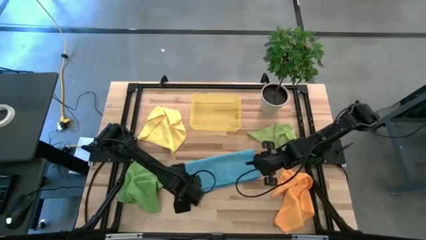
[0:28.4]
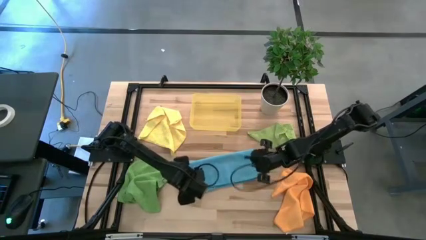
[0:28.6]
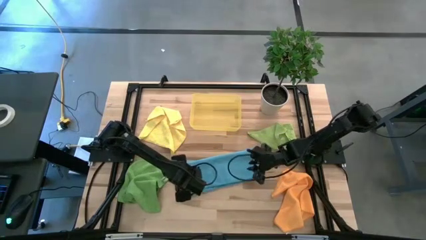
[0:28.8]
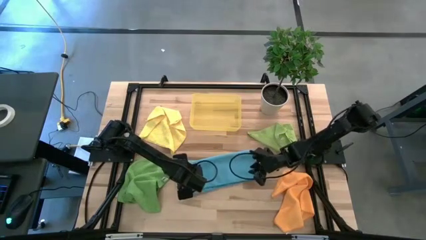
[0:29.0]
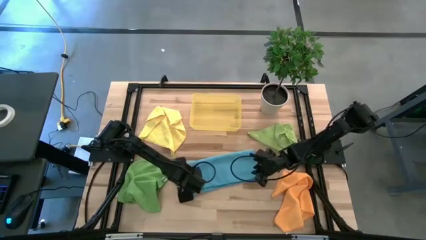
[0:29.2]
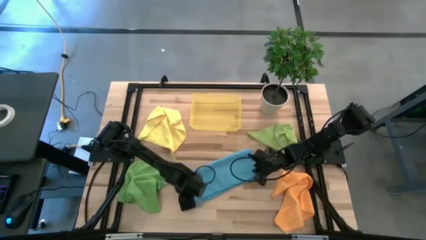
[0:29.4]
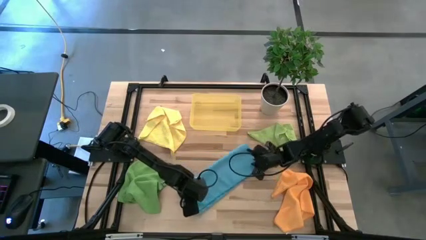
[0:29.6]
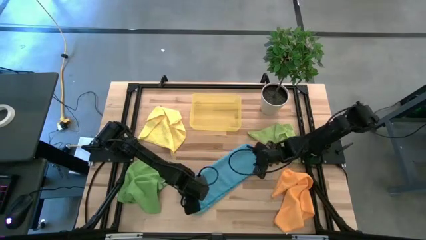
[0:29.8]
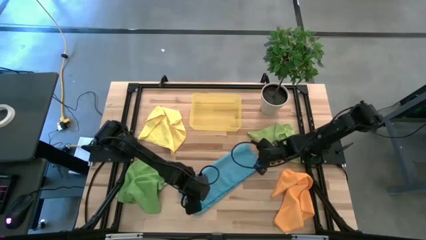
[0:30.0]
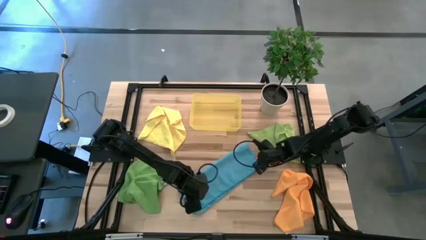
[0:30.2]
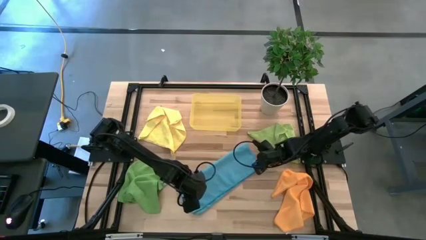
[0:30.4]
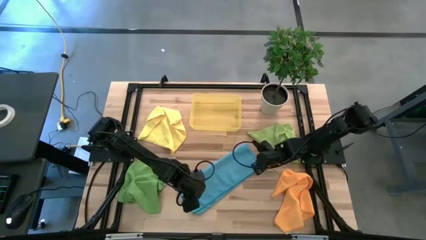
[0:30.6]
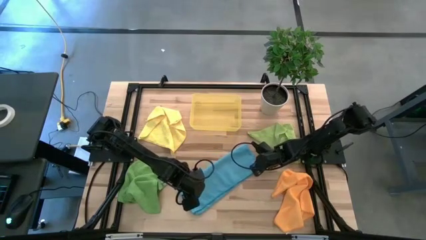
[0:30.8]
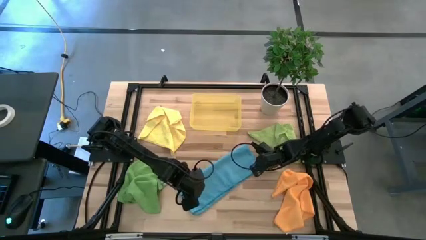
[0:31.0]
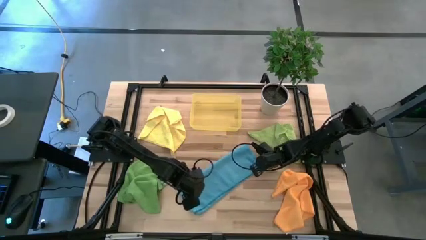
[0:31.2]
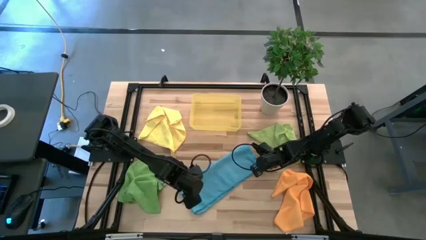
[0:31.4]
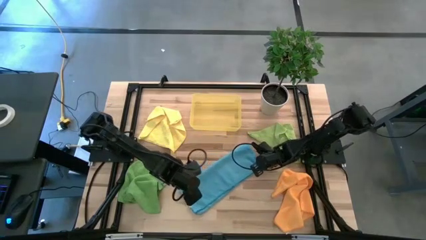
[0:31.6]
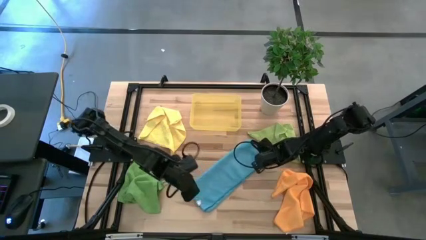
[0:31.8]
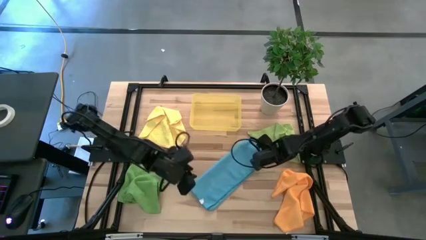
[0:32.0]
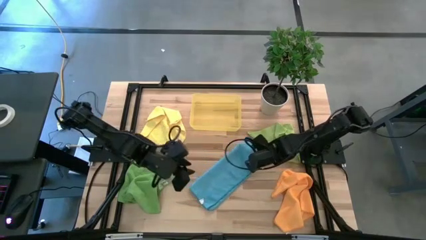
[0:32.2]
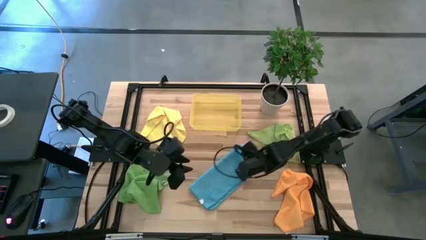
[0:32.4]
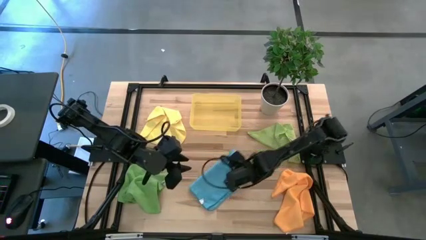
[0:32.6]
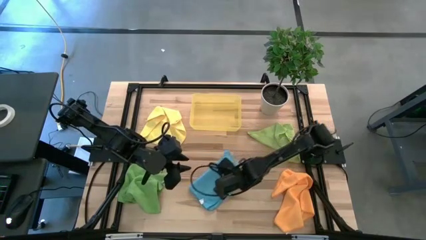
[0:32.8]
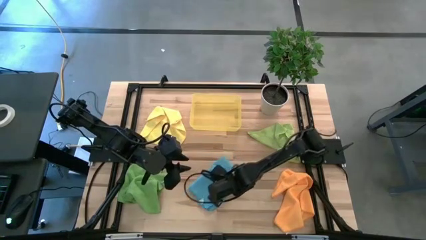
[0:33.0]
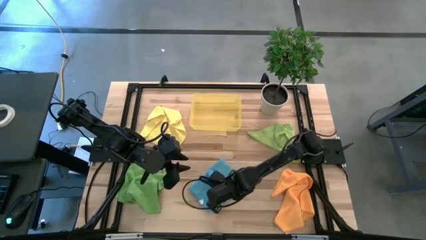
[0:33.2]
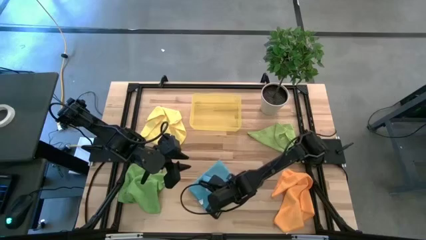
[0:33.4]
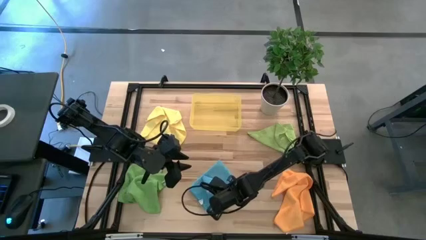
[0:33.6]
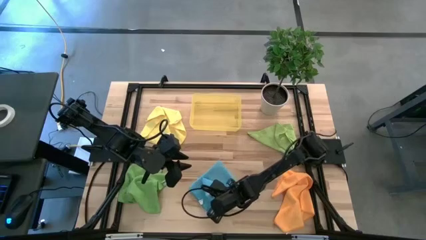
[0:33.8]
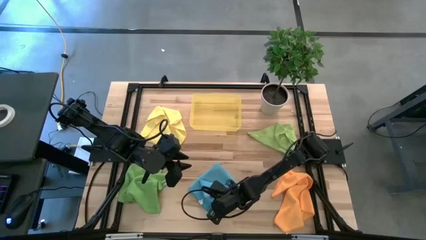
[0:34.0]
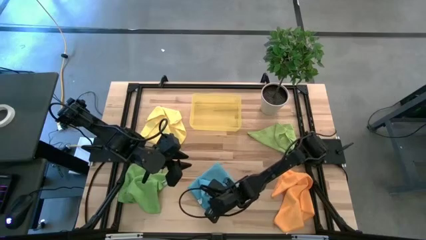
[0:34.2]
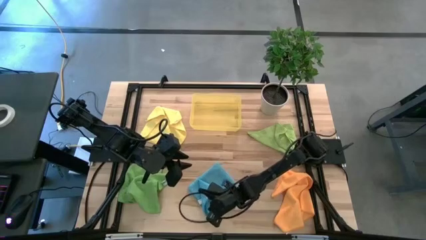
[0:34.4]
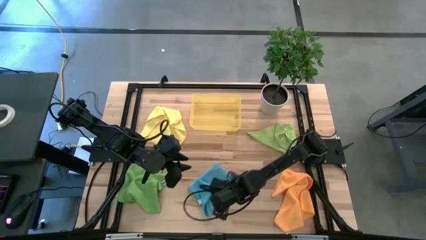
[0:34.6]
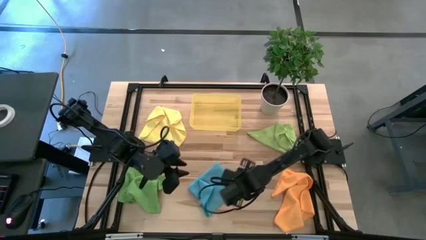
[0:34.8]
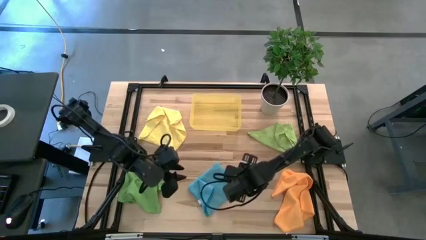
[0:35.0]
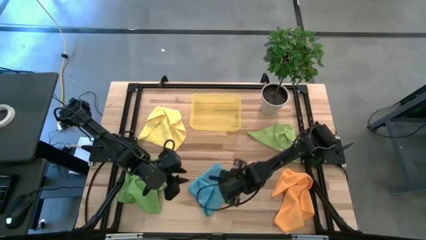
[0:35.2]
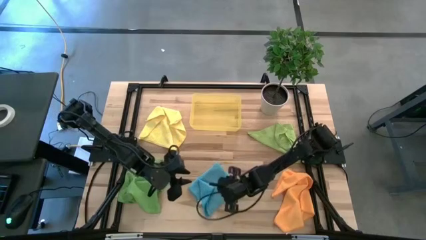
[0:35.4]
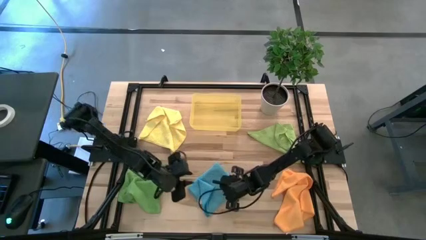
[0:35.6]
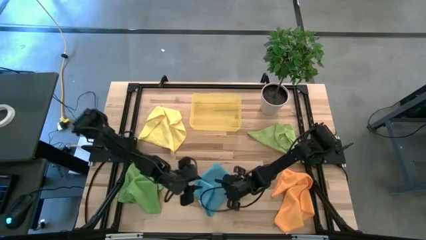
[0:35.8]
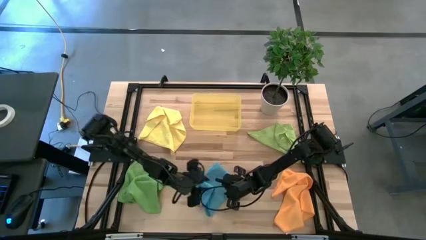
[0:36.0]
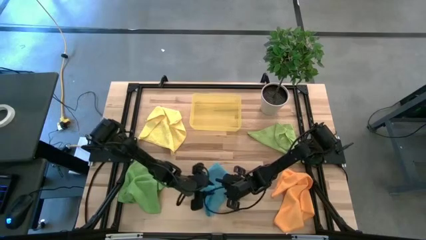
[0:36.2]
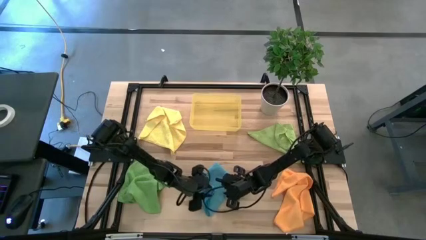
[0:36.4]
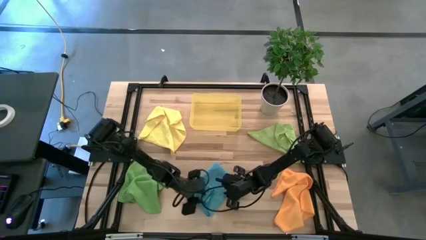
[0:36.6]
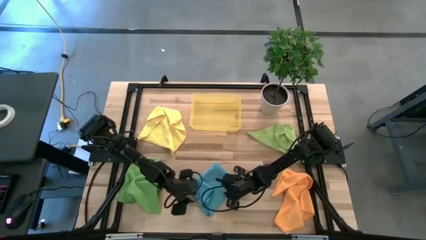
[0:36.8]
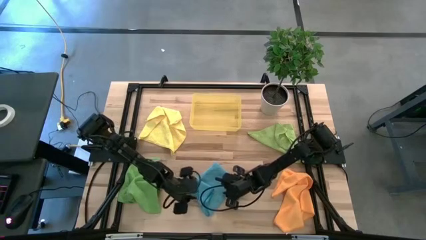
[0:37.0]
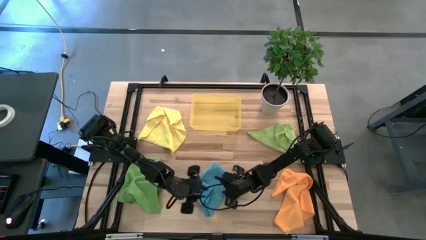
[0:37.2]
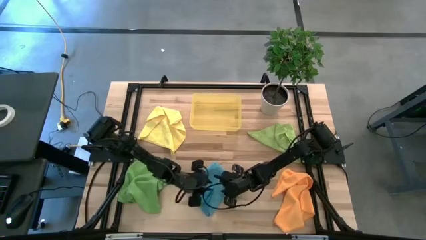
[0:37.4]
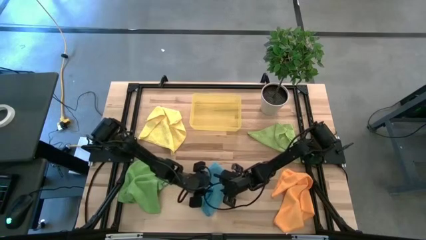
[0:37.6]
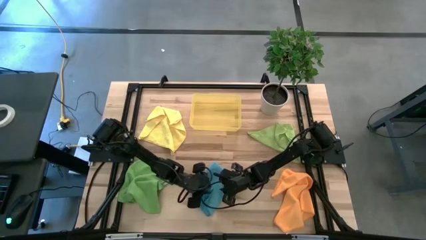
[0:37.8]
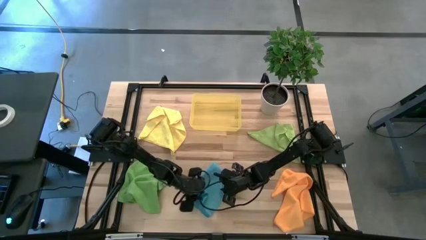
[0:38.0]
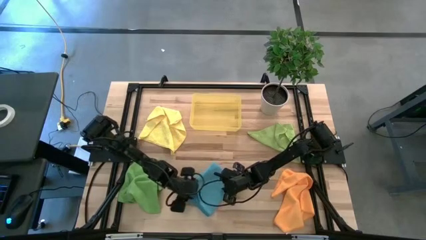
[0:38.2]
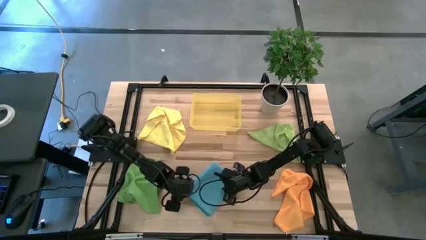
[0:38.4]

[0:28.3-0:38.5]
Task: Fold microfiber towels
Fold the blue microfiber cloth

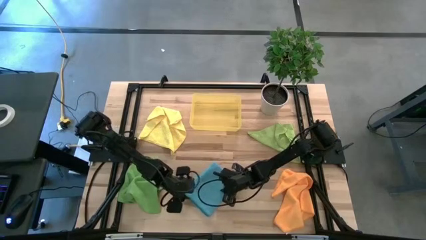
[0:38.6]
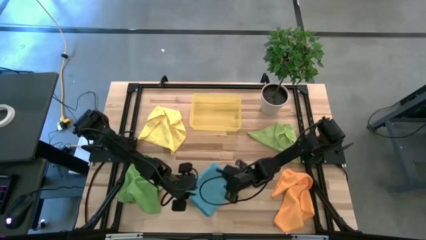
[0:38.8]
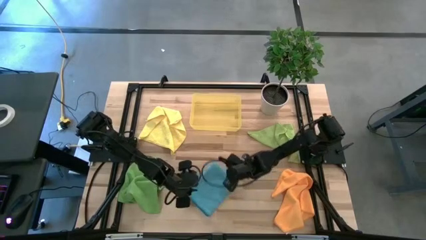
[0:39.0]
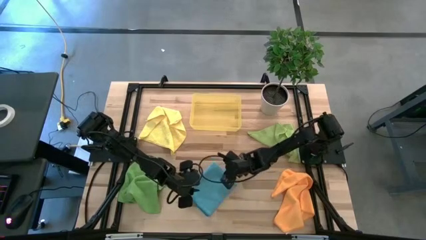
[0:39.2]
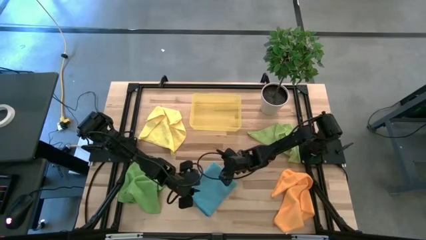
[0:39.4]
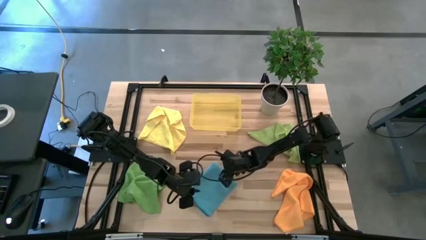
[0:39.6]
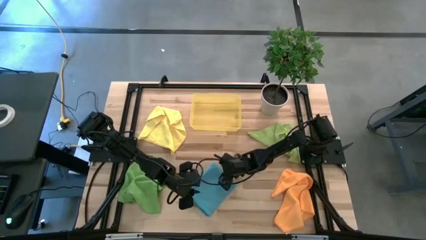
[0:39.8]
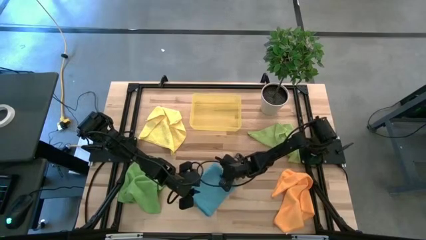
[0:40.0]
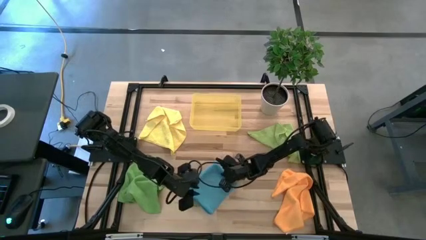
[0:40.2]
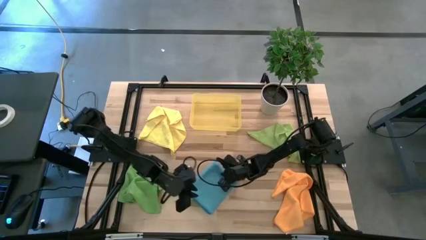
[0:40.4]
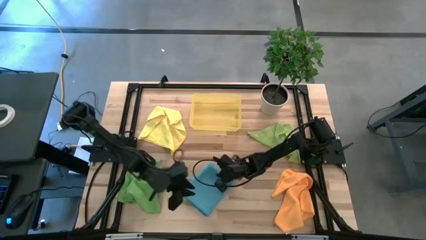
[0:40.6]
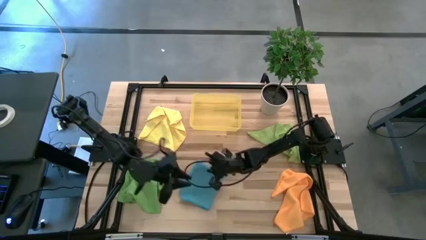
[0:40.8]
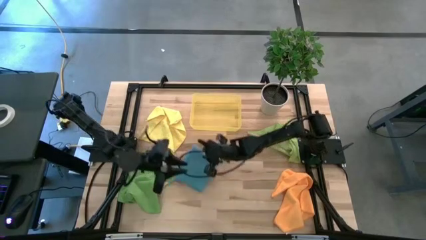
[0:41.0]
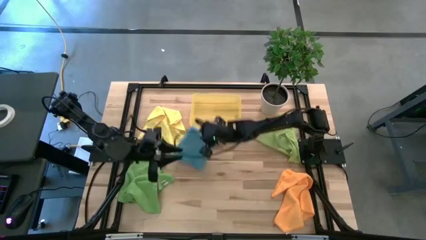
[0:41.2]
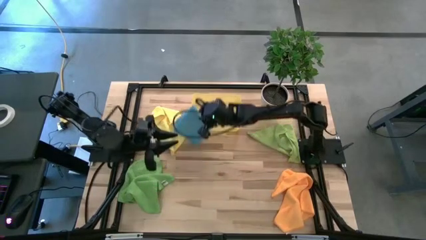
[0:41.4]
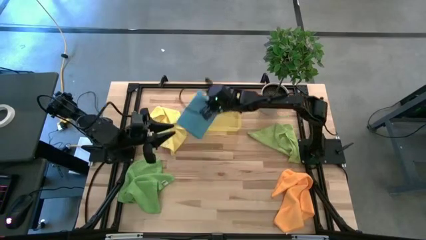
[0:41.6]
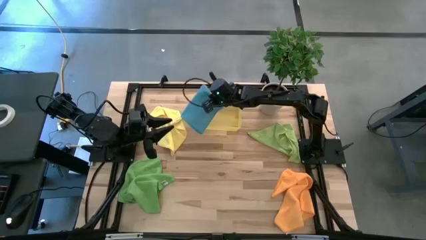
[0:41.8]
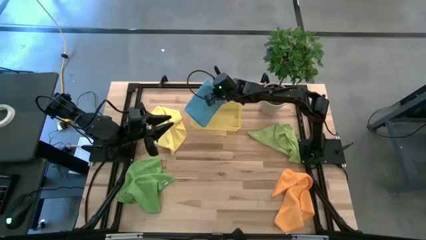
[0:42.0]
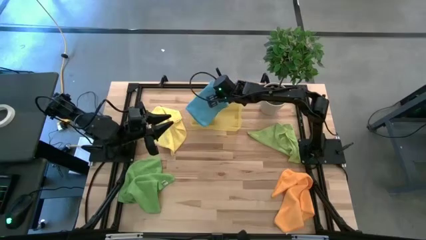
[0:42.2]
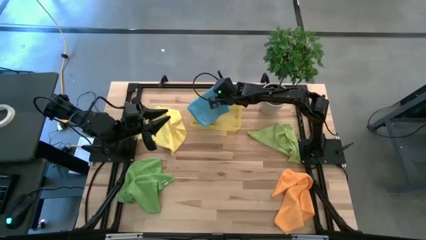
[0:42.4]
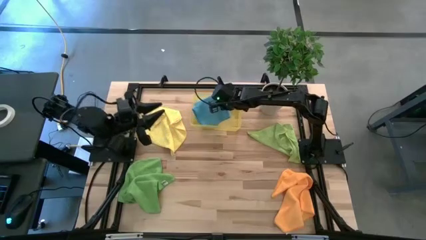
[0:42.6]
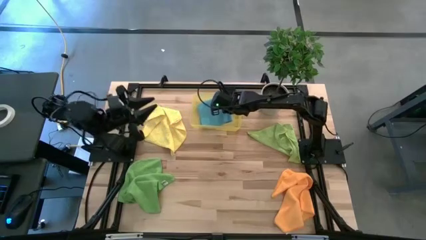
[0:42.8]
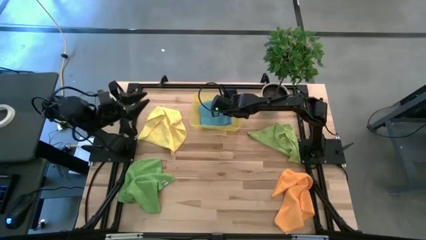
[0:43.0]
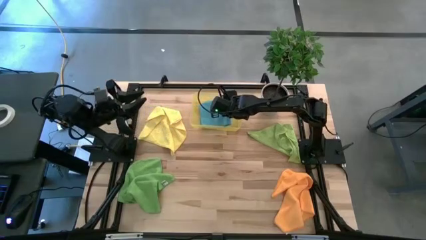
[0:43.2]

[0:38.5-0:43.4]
Put the folded blue microfiber cloth into the yellow bin
